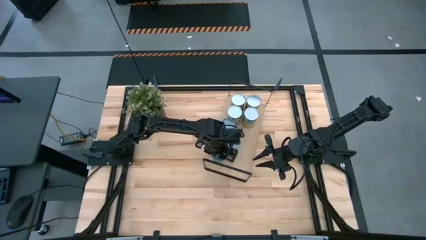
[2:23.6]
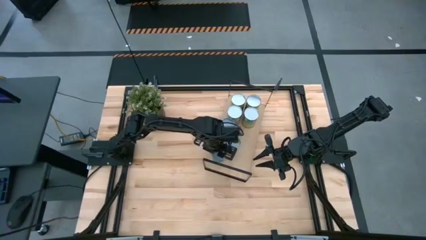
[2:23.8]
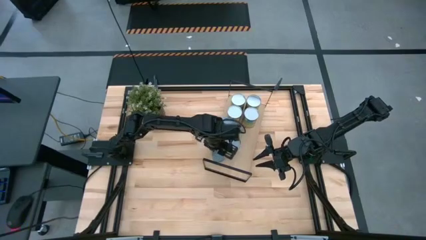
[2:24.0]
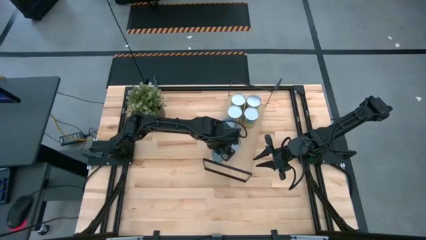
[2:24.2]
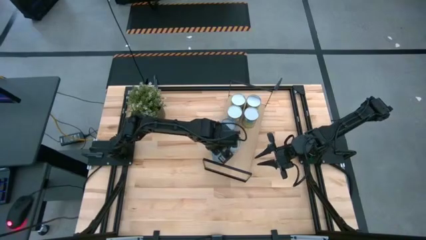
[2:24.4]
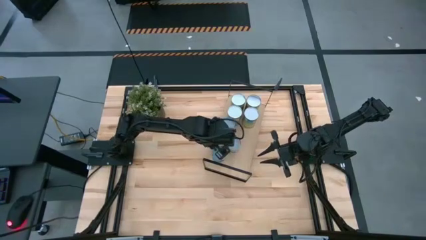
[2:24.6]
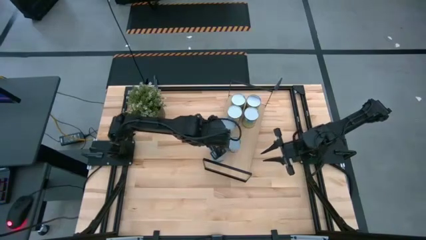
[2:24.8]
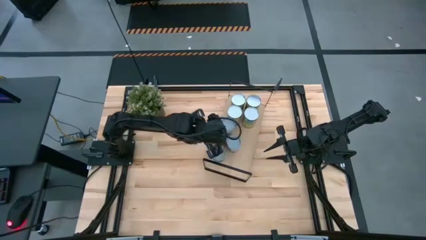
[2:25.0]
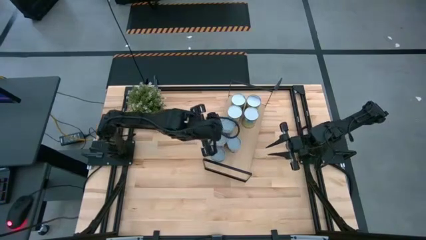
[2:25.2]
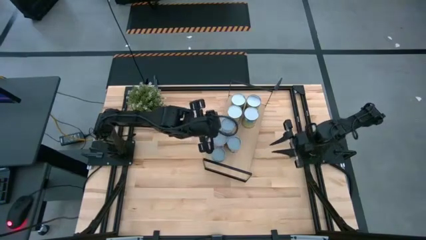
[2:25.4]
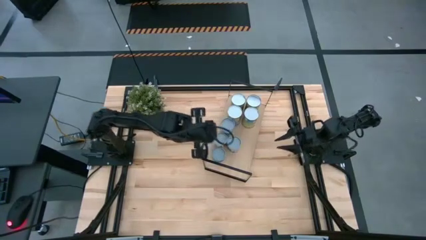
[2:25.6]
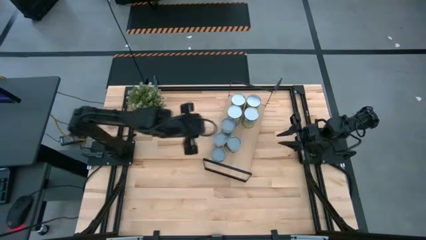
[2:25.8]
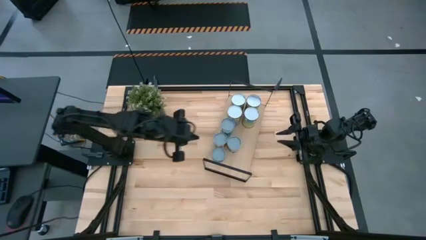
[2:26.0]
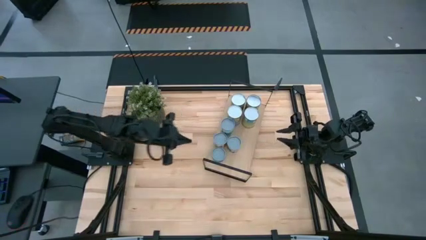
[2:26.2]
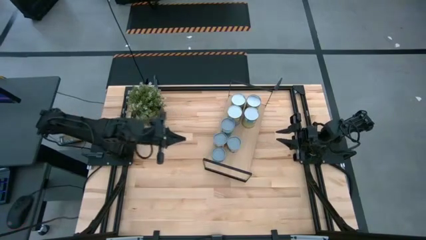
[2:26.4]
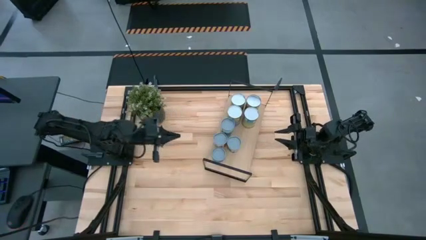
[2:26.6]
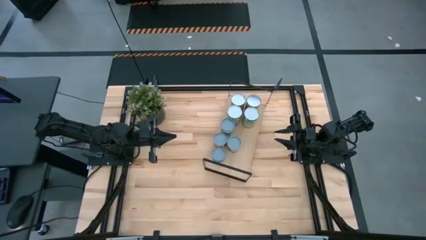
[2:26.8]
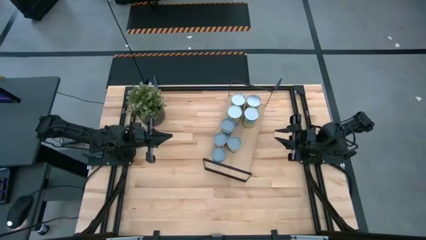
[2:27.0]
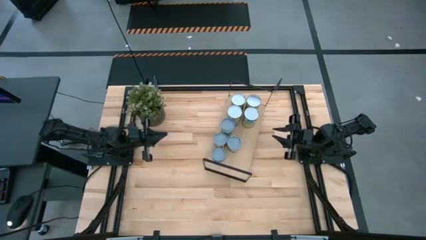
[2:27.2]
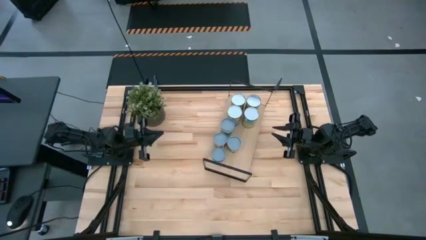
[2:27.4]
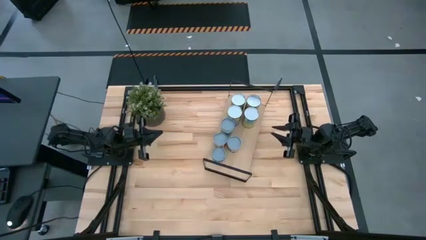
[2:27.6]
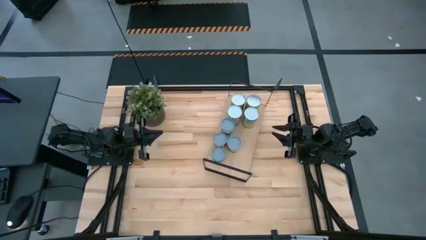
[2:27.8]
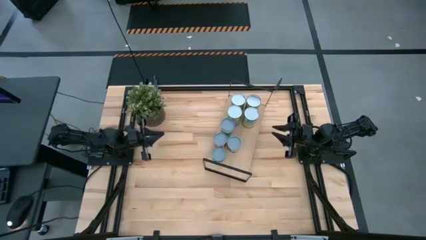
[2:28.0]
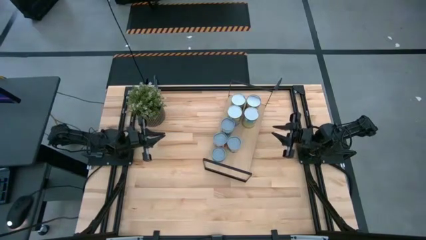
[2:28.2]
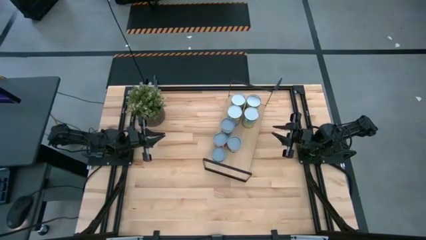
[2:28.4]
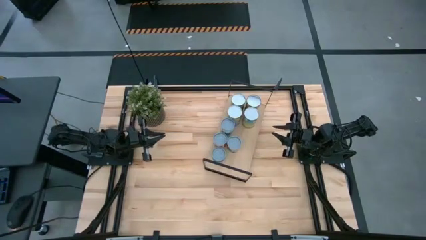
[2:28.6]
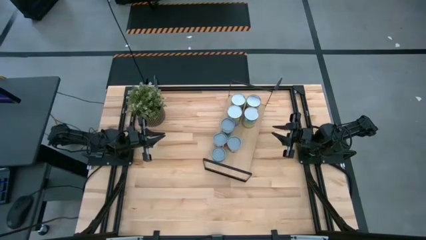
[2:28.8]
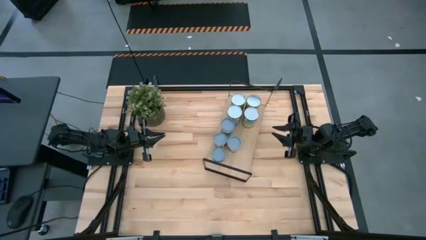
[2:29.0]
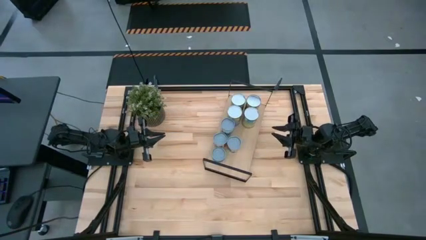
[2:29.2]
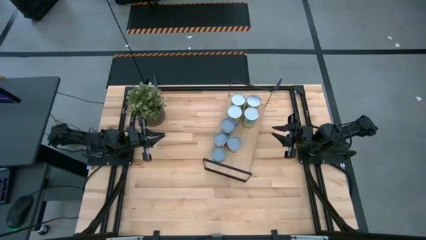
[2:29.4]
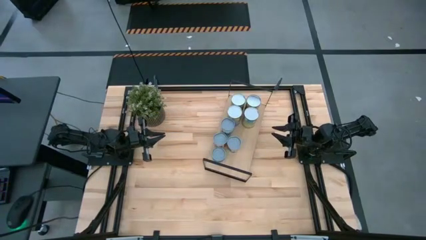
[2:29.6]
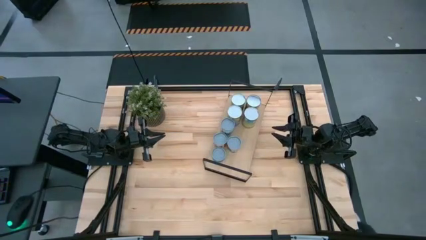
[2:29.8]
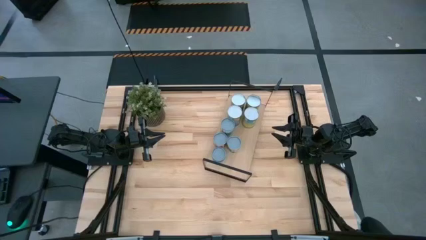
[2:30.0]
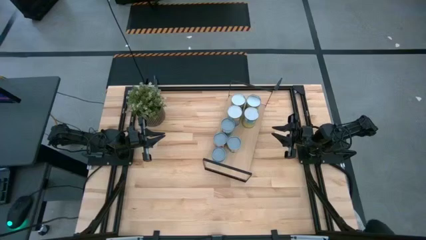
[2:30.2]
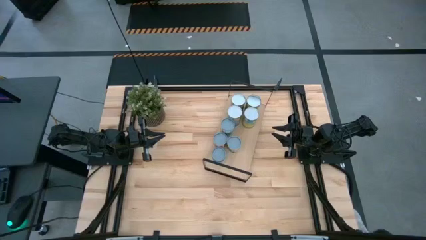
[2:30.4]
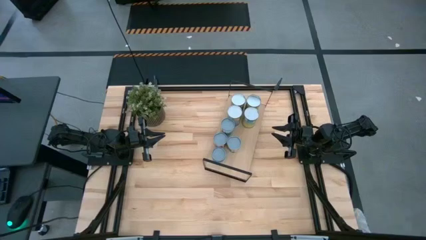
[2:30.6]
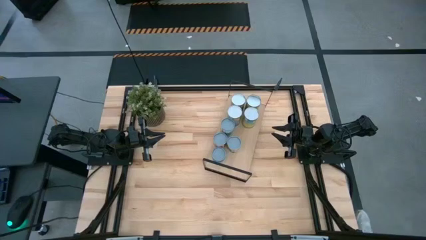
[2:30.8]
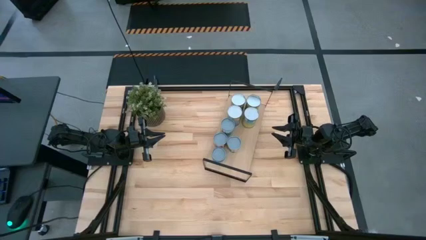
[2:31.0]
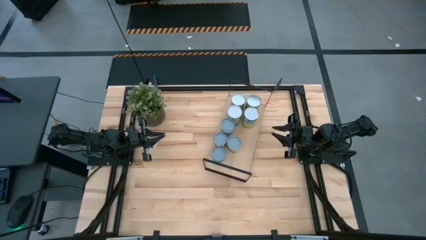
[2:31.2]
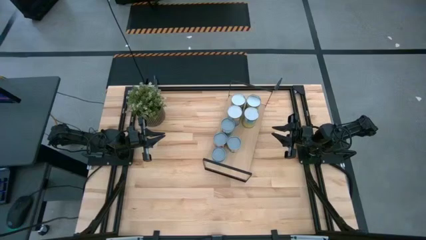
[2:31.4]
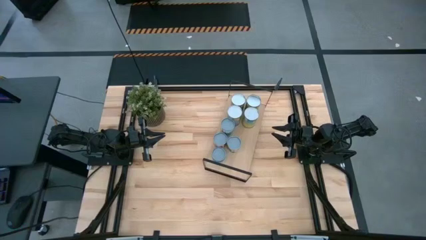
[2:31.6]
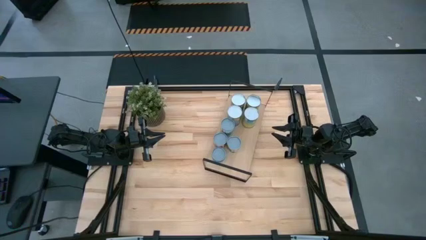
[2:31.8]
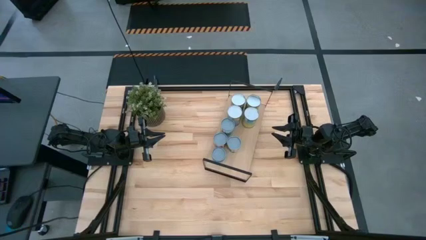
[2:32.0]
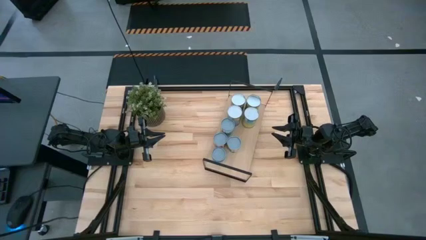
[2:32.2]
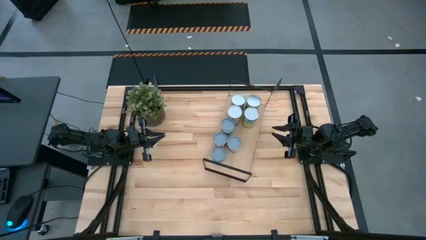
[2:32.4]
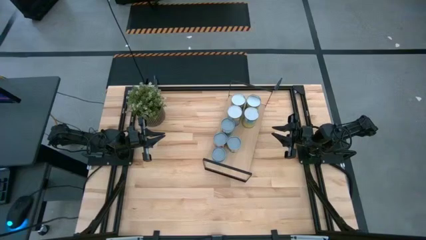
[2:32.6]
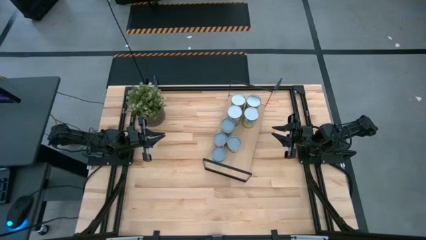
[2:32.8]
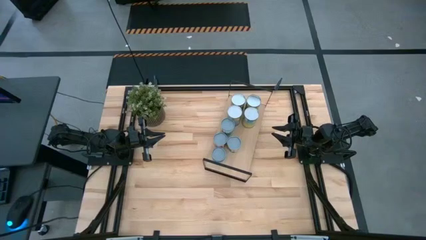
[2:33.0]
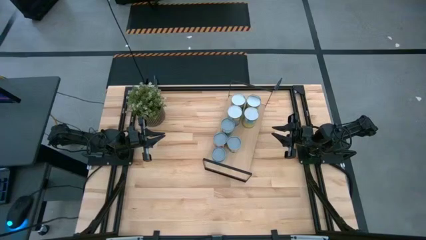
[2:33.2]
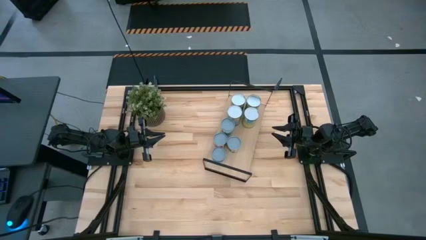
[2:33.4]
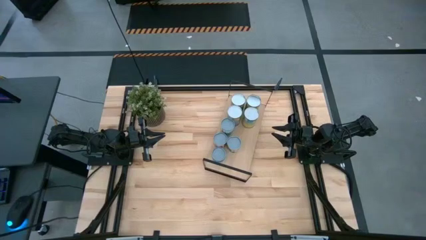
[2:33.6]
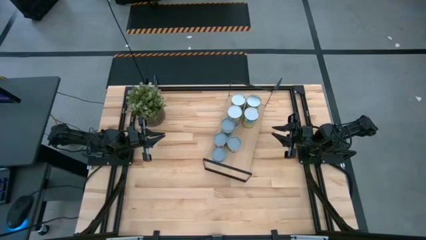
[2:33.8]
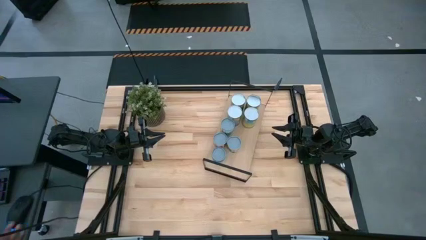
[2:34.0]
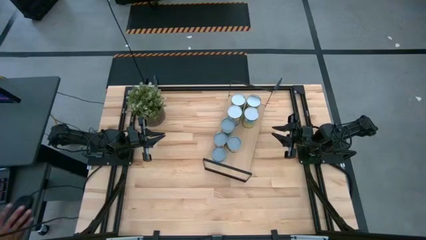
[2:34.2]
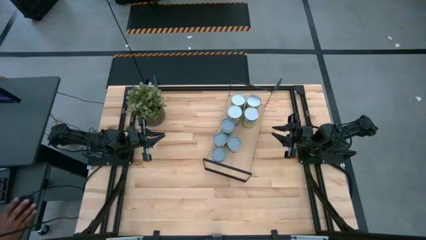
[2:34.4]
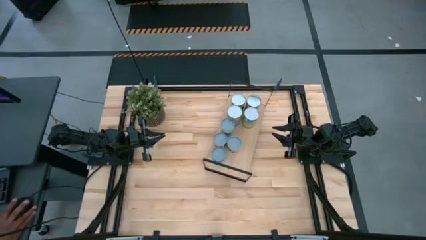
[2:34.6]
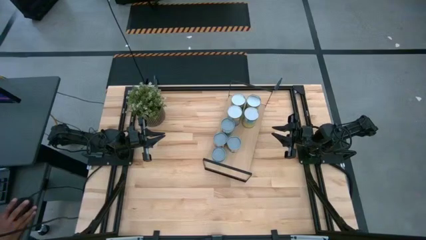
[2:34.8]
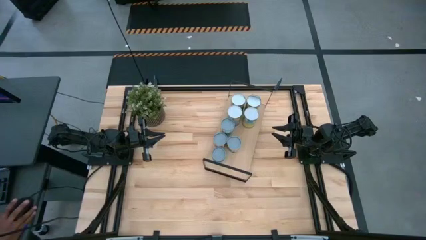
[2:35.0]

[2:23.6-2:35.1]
Task: Pick and place cans onto a shelf
Return to Home Position
